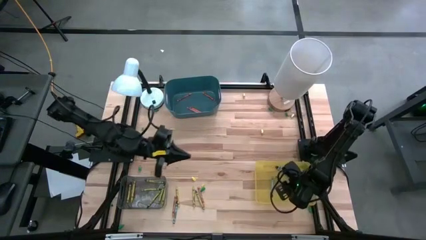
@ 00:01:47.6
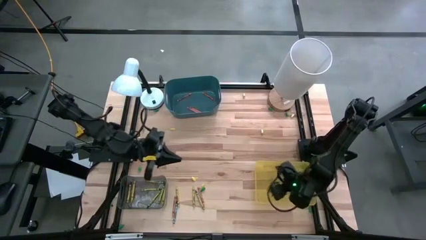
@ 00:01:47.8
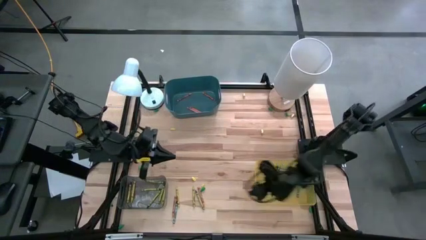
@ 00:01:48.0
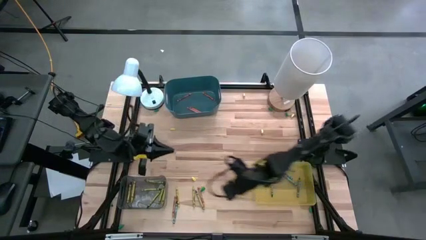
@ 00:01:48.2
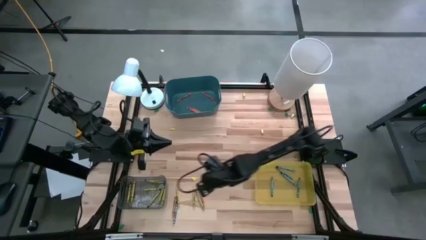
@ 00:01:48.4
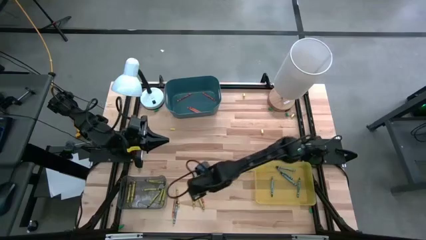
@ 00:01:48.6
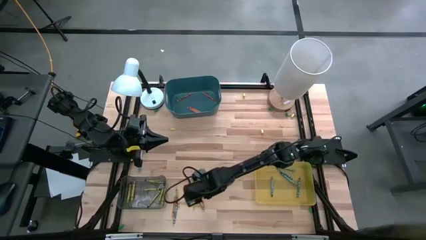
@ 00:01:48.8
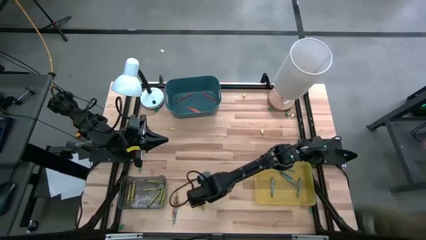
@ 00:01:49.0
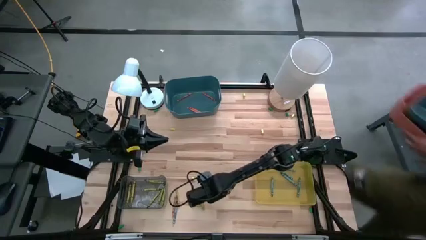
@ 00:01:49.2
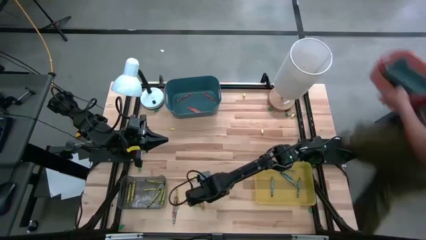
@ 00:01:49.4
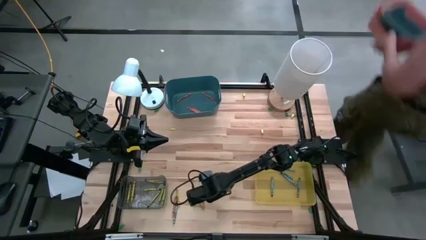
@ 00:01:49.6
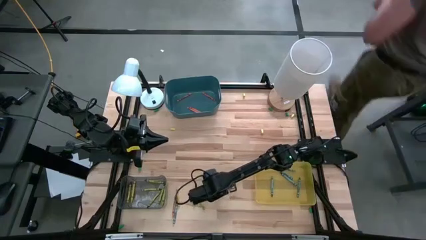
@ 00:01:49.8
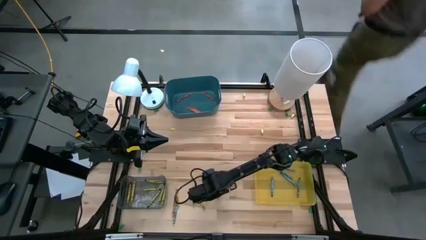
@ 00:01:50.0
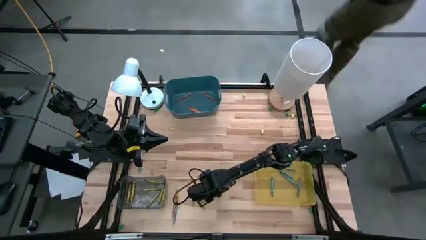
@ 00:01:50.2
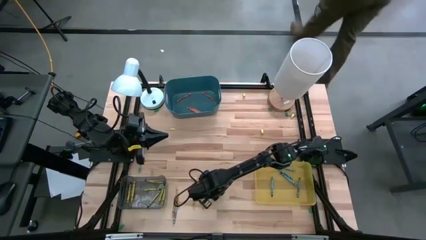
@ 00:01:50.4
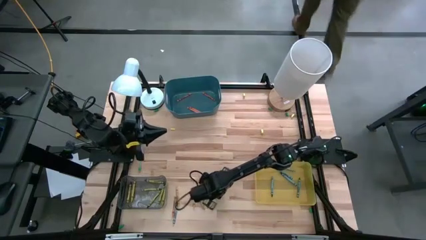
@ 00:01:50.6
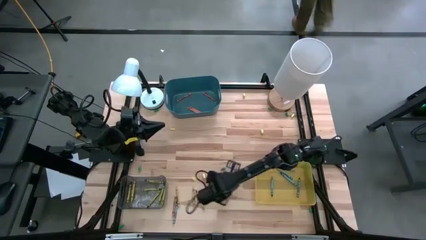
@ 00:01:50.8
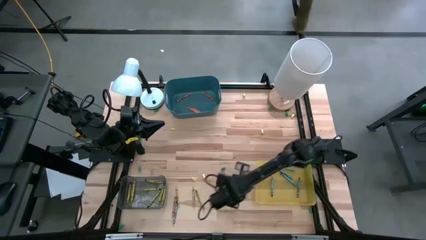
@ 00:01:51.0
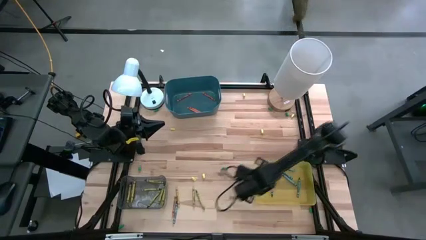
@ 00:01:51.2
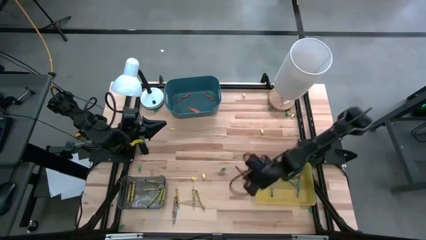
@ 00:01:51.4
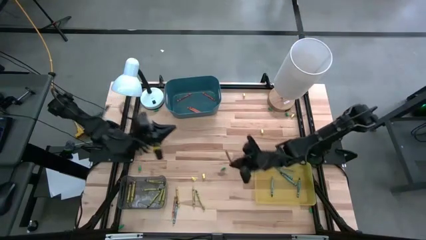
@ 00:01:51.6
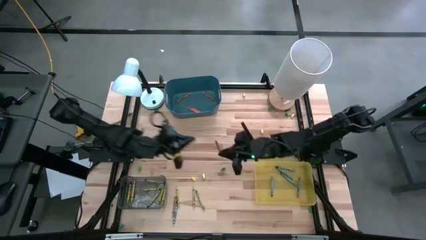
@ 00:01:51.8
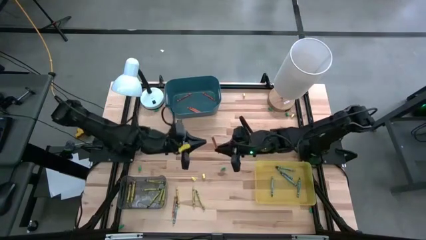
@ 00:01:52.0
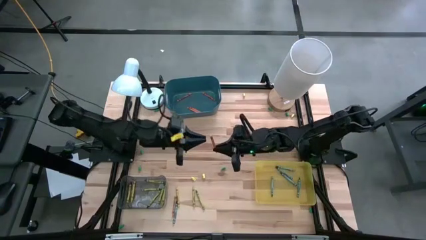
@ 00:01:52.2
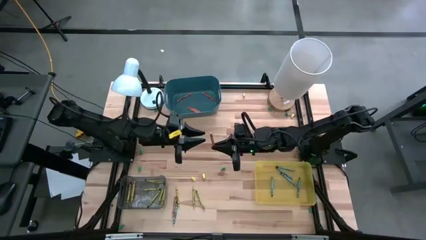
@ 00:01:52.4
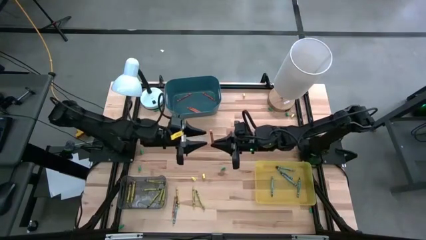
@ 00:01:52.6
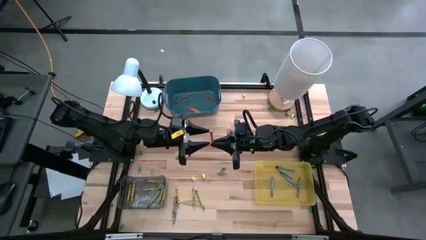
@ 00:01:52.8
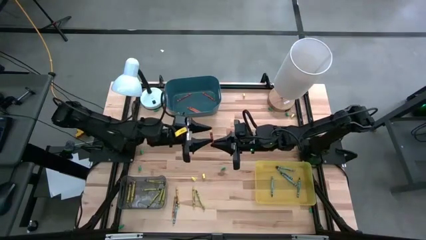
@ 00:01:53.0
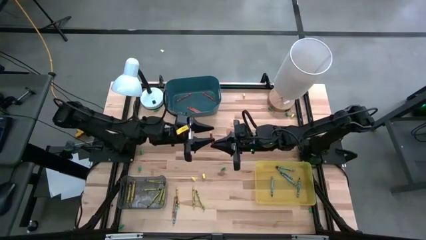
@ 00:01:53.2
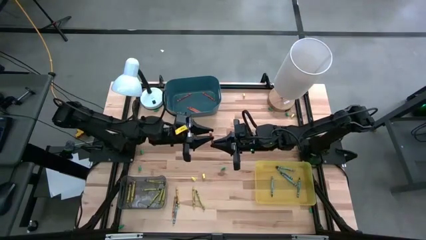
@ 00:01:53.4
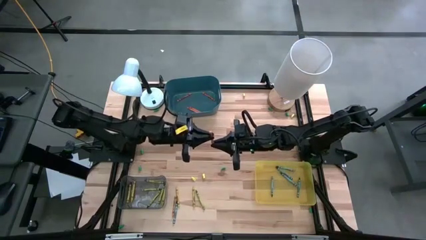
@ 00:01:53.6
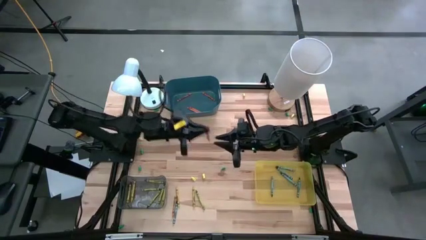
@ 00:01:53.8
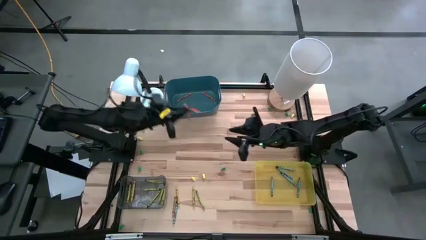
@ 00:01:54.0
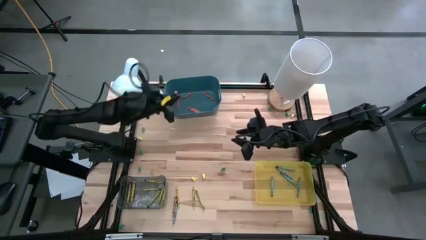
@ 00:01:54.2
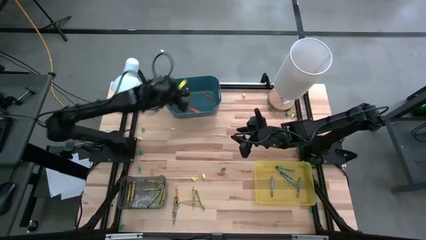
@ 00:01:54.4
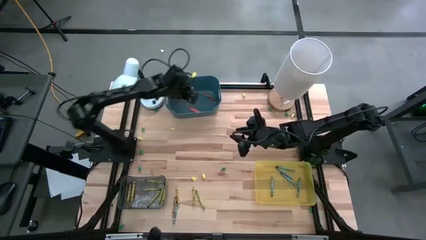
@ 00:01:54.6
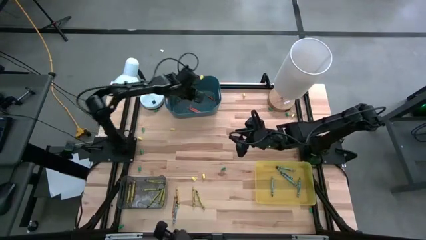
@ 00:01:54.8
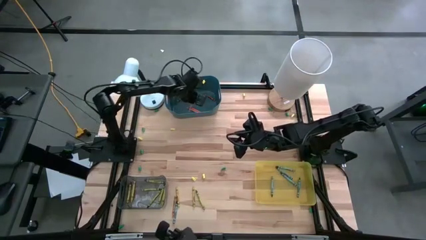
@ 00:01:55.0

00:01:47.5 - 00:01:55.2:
Task: Sort crayons
Put the right orange crayon into the blue bin

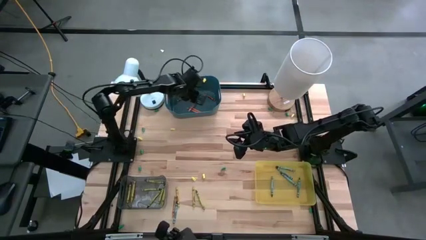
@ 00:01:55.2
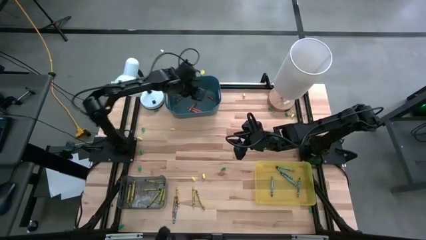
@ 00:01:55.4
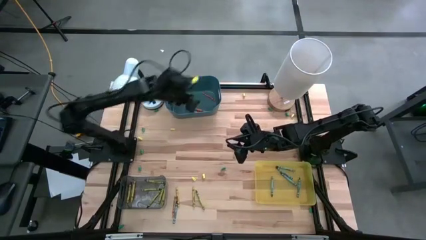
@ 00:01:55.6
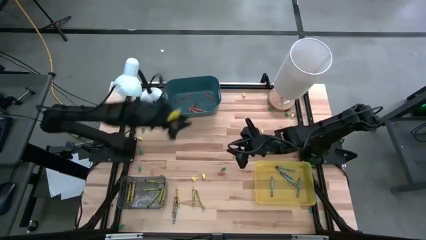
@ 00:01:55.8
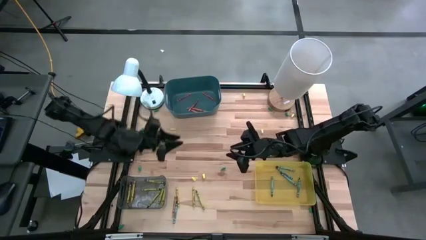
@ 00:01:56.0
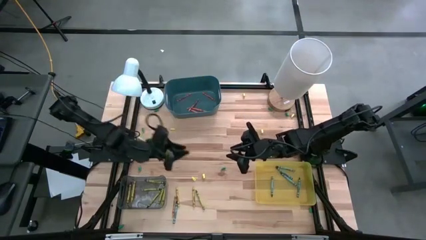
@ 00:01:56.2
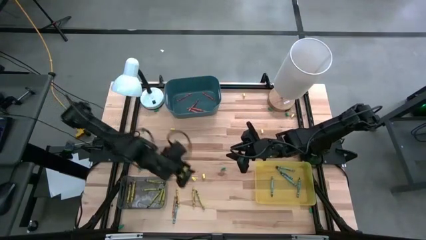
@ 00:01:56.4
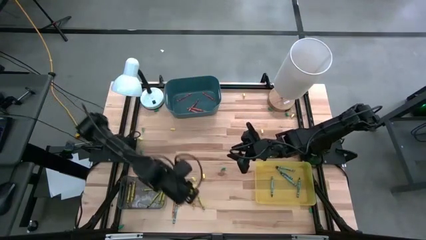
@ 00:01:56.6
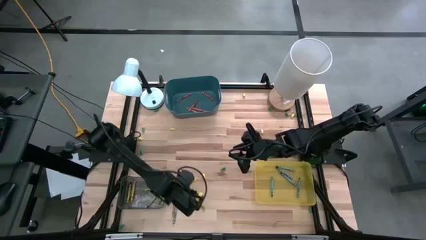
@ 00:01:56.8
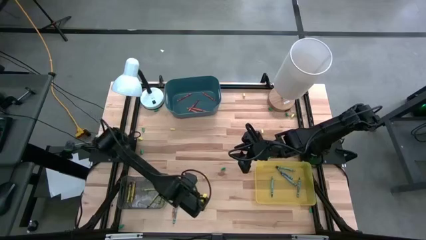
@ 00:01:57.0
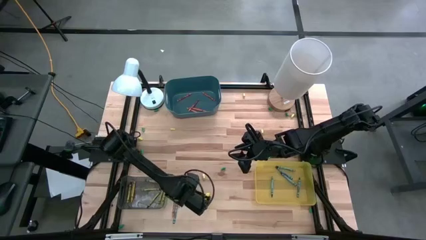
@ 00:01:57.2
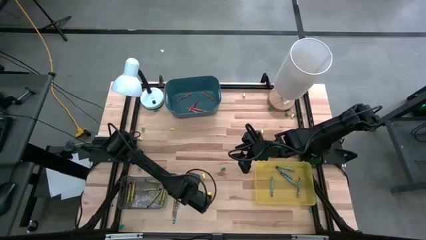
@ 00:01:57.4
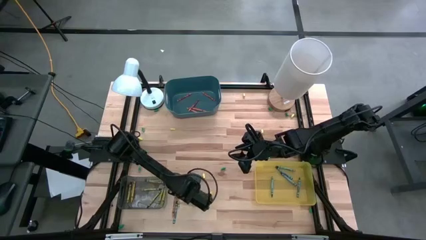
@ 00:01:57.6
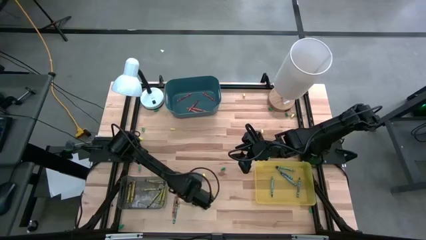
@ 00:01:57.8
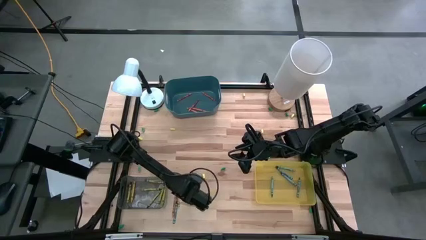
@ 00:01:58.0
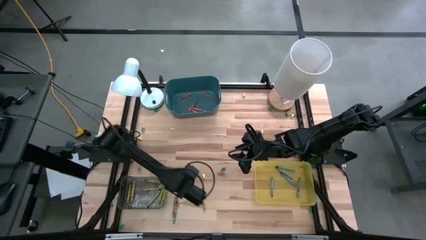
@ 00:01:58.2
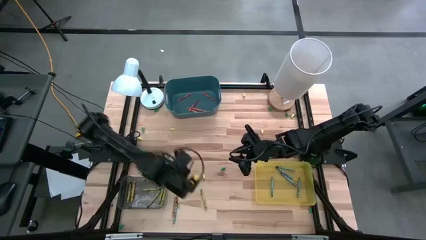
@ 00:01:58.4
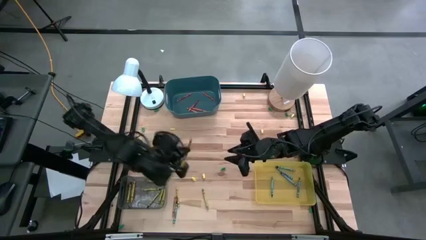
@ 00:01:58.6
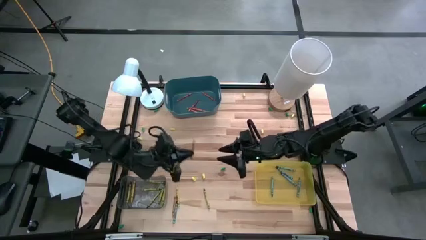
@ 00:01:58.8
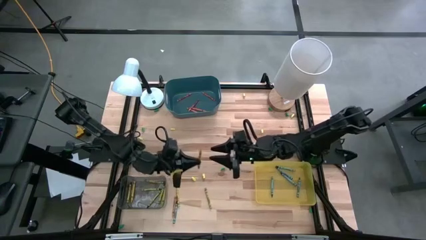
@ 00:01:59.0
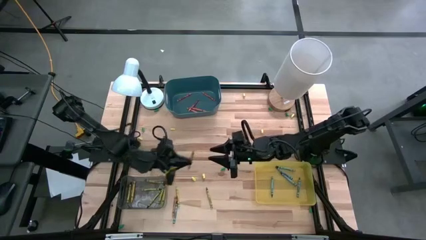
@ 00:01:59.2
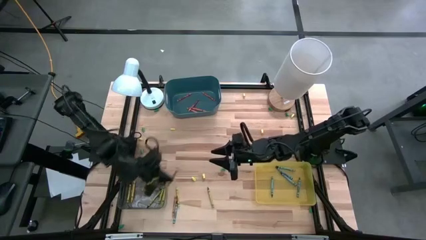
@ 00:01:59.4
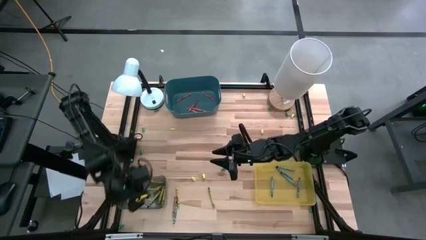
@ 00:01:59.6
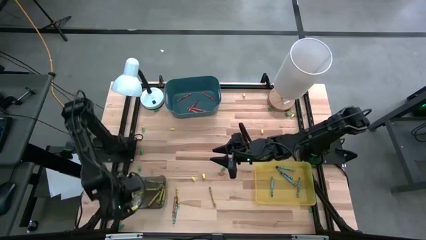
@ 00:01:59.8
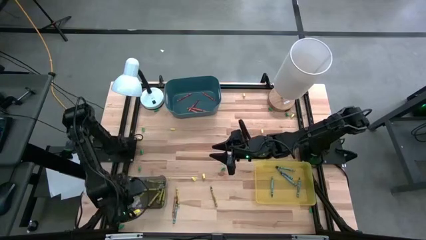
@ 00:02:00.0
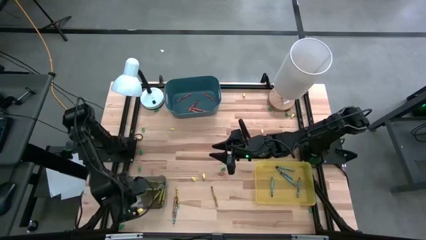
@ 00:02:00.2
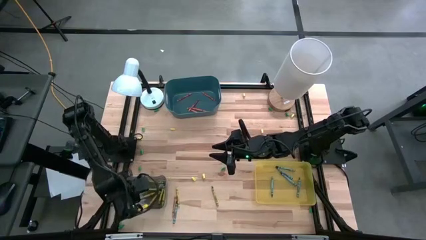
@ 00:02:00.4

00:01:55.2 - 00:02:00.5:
Put the middle yellow crayon into the gray bin

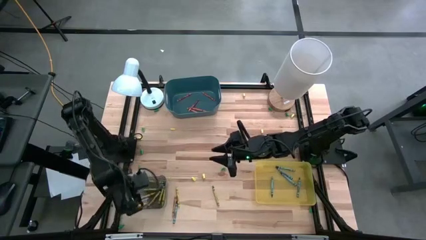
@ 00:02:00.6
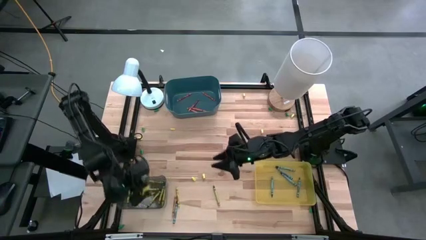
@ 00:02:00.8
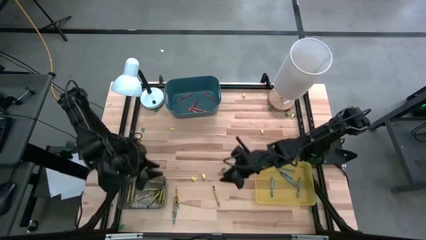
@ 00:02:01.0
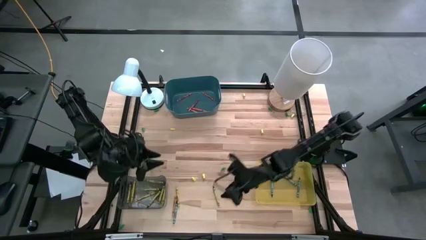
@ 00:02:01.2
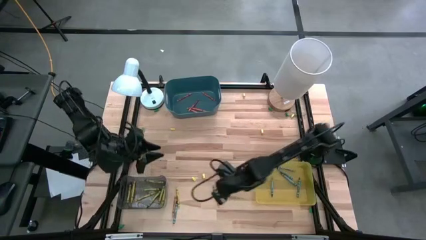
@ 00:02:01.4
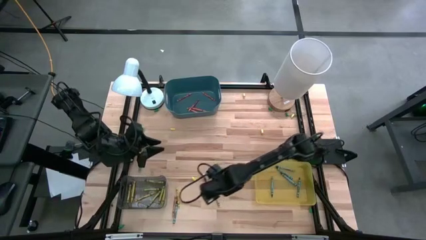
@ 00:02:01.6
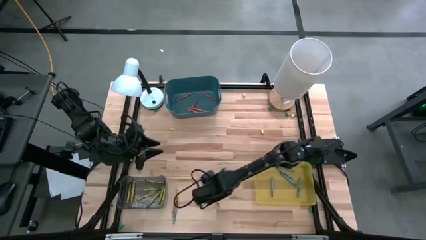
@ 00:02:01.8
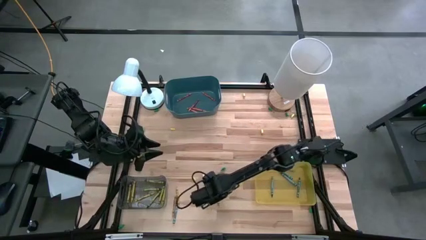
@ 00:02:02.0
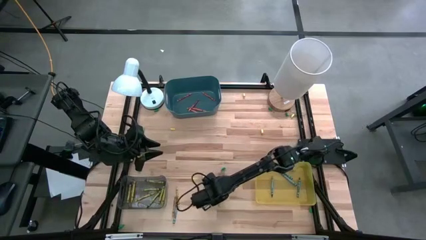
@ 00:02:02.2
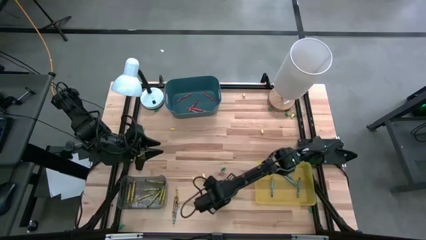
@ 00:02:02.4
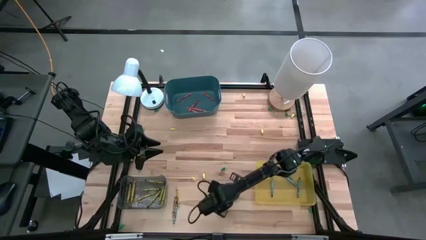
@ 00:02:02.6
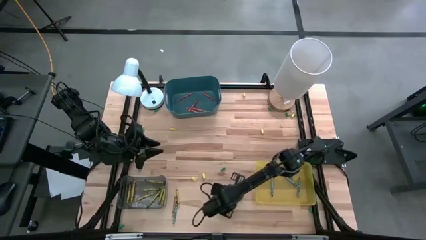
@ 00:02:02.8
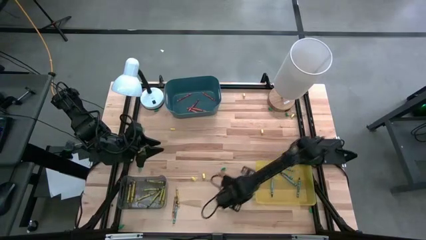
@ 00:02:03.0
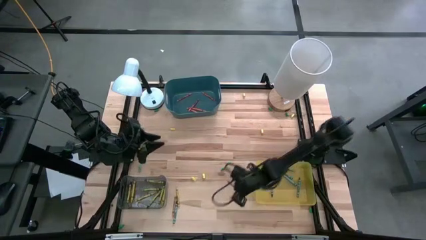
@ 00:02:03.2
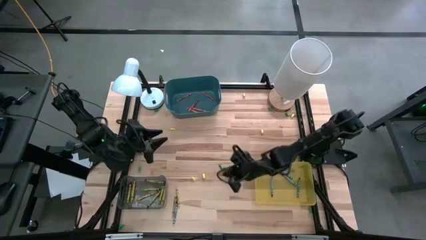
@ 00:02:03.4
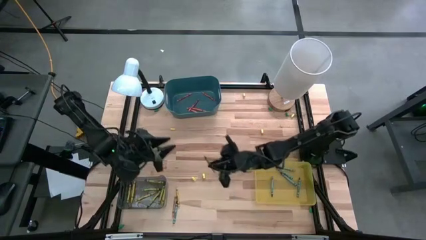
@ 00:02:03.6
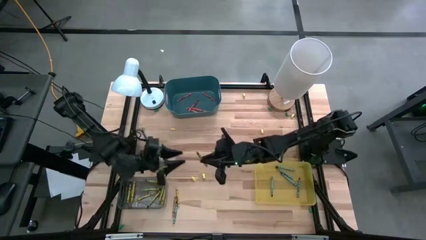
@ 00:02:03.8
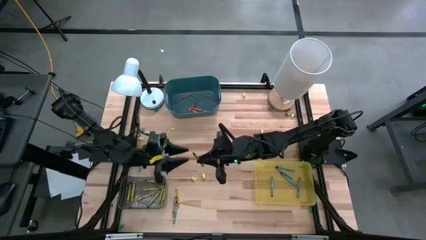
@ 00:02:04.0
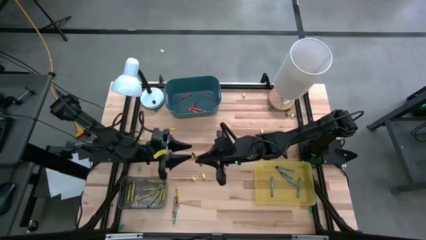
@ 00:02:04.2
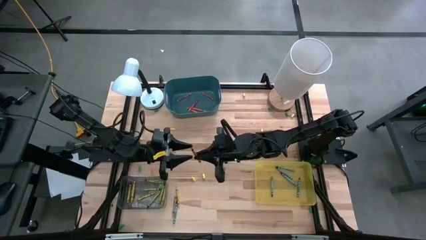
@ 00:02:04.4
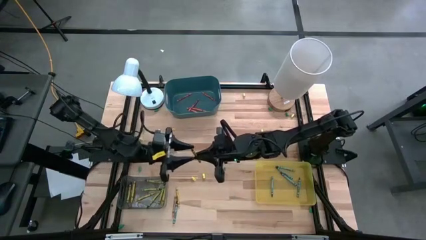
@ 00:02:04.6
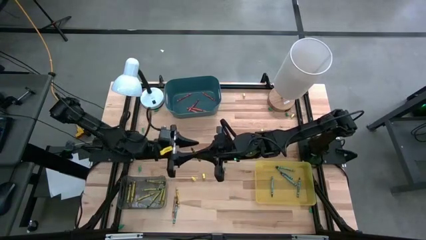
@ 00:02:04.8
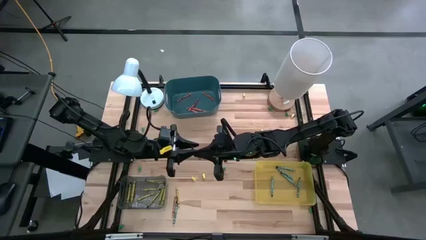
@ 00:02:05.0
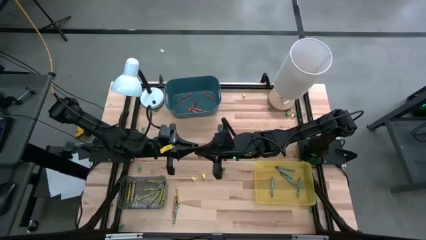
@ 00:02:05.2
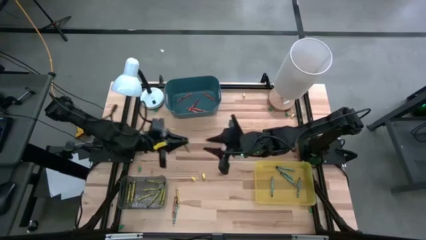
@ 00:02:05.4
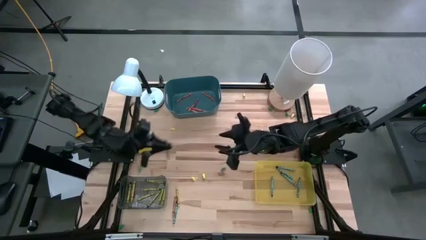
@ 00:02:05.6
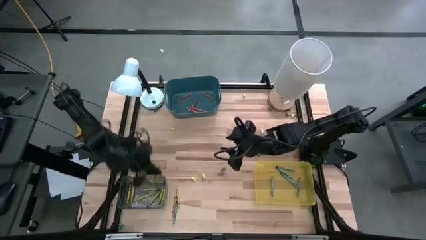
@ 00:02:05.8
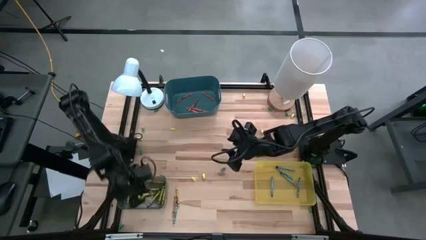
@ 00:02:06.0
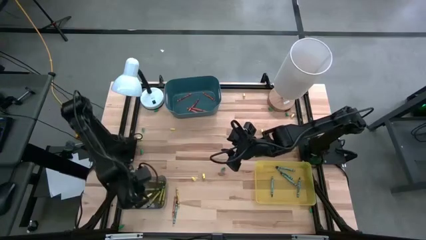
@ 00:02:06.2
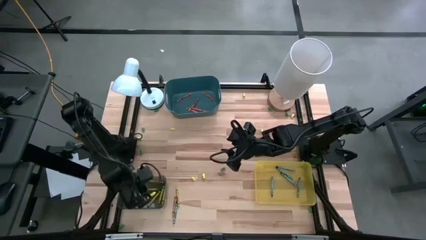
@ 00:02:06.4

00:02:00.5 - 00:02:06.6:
Put the right yellow crayon into the gray bin
